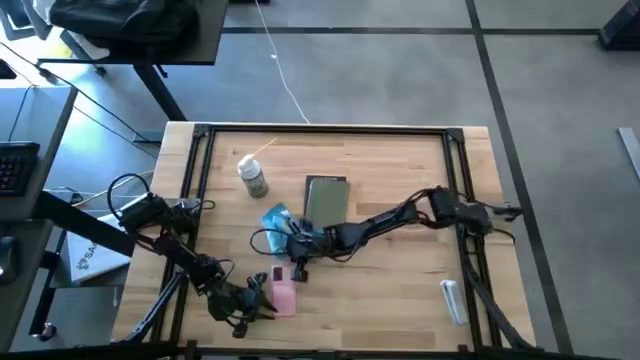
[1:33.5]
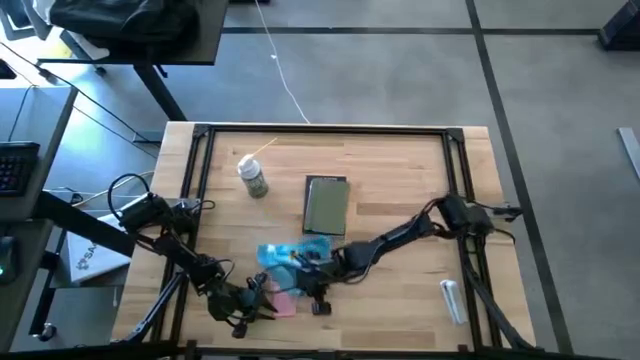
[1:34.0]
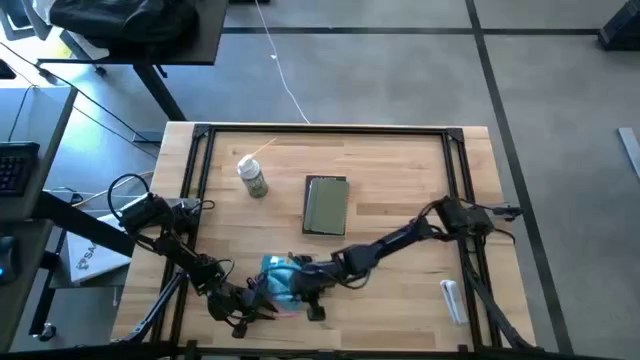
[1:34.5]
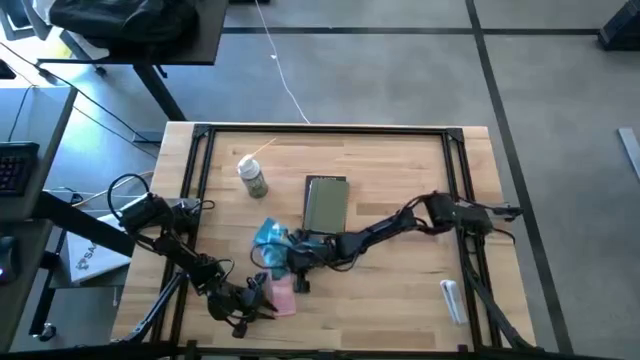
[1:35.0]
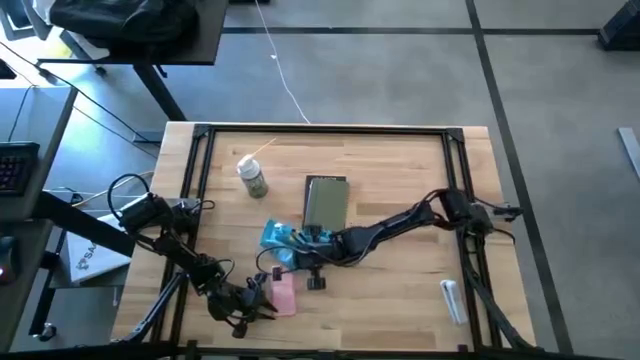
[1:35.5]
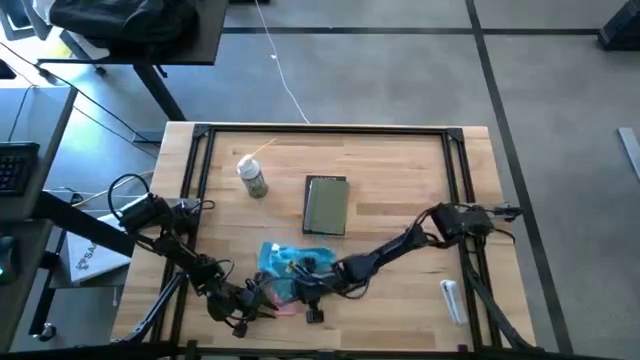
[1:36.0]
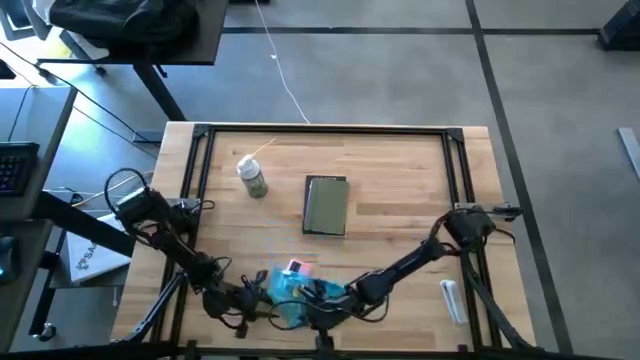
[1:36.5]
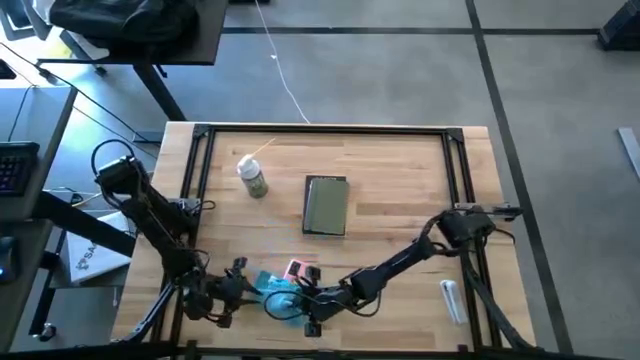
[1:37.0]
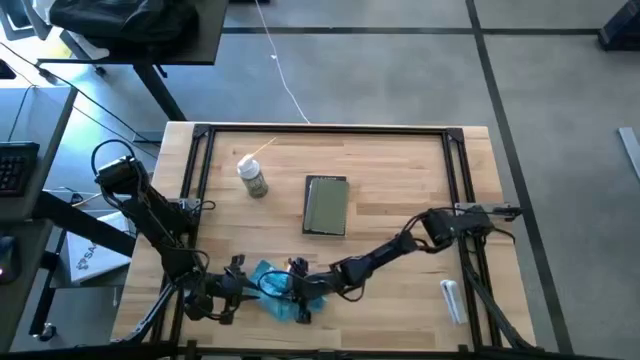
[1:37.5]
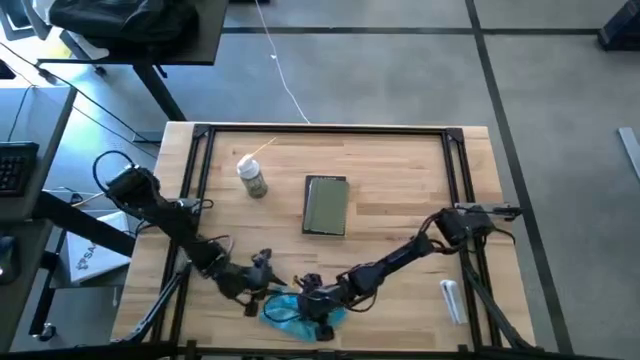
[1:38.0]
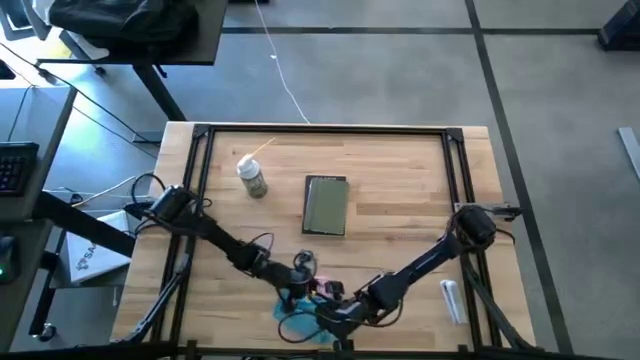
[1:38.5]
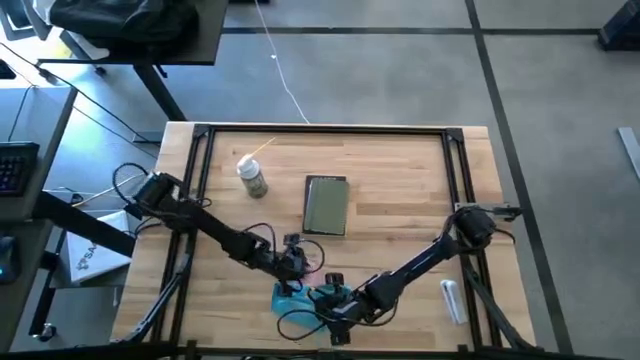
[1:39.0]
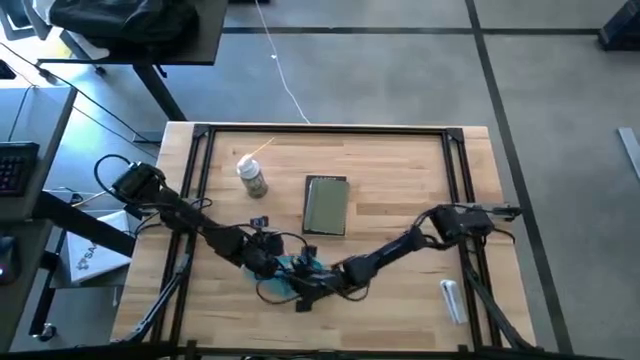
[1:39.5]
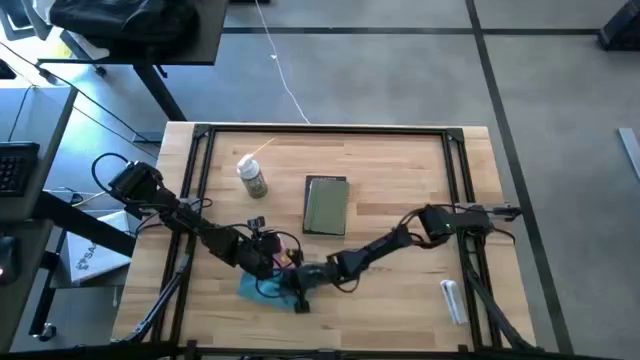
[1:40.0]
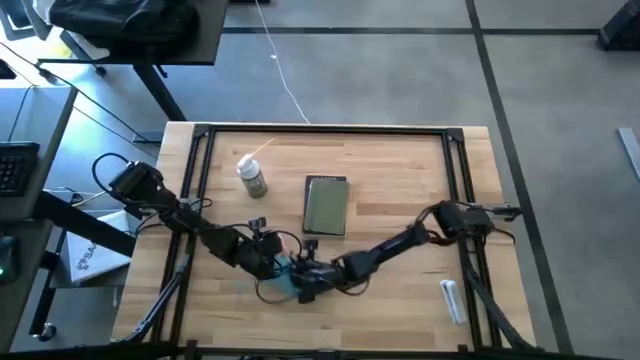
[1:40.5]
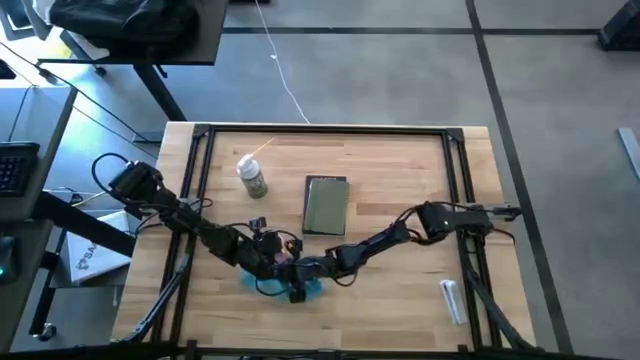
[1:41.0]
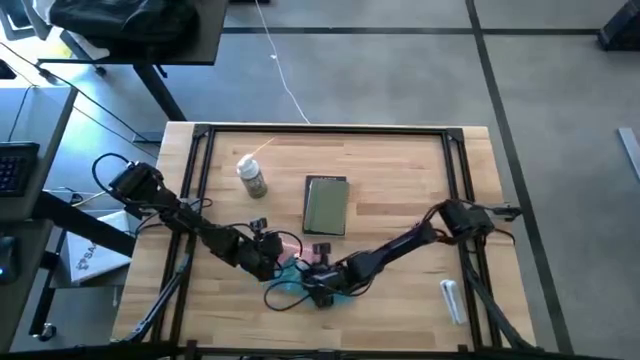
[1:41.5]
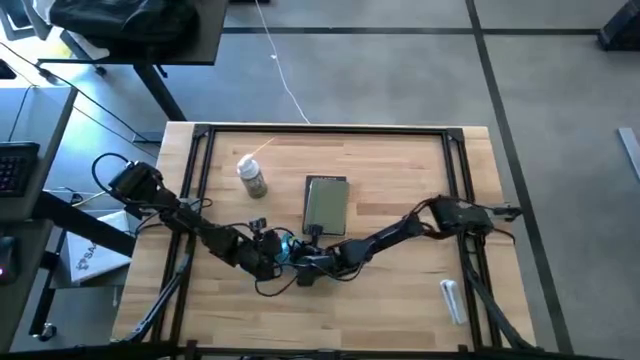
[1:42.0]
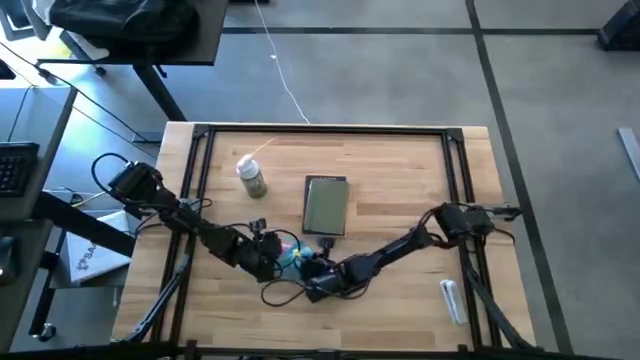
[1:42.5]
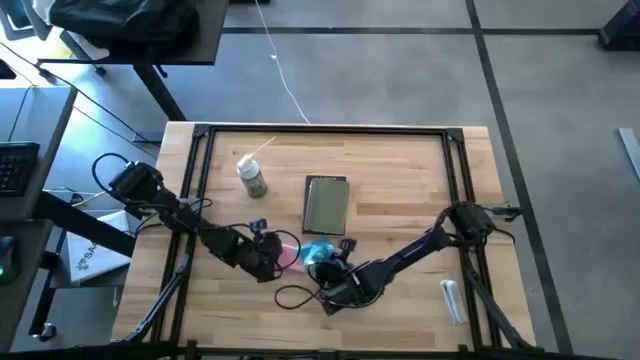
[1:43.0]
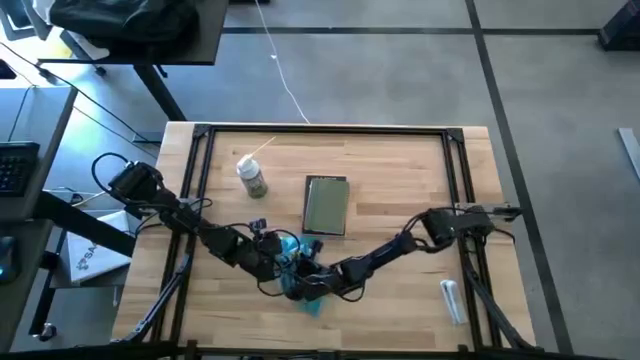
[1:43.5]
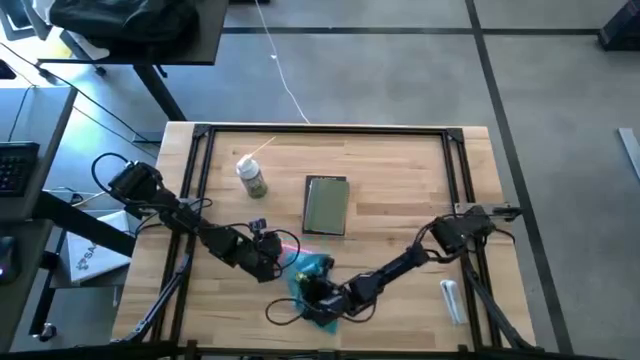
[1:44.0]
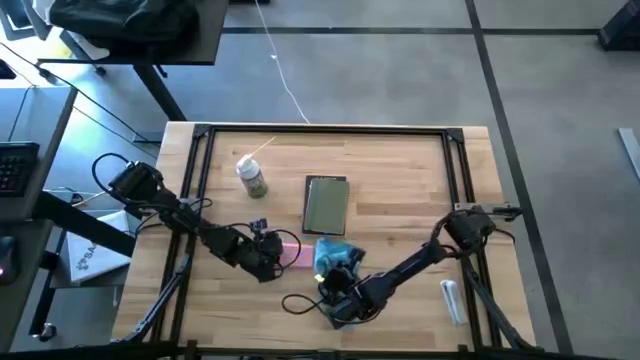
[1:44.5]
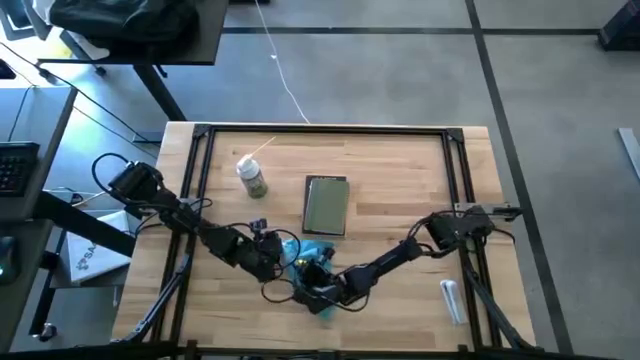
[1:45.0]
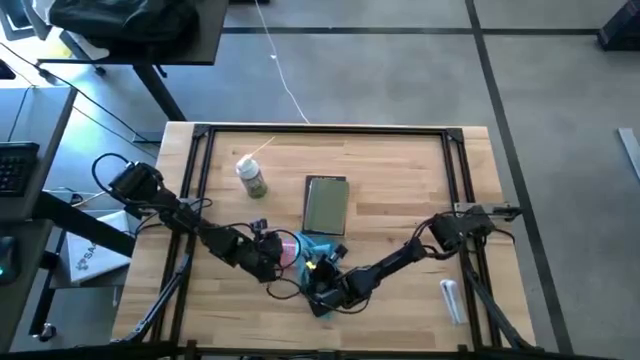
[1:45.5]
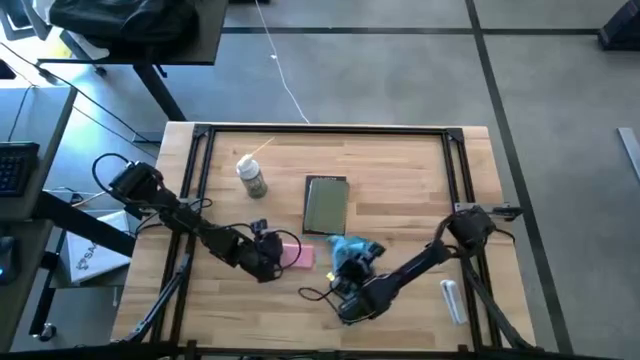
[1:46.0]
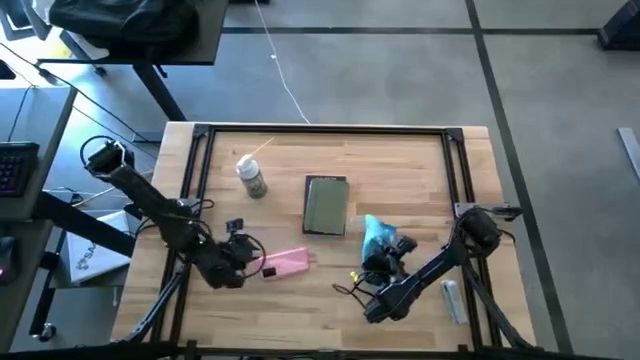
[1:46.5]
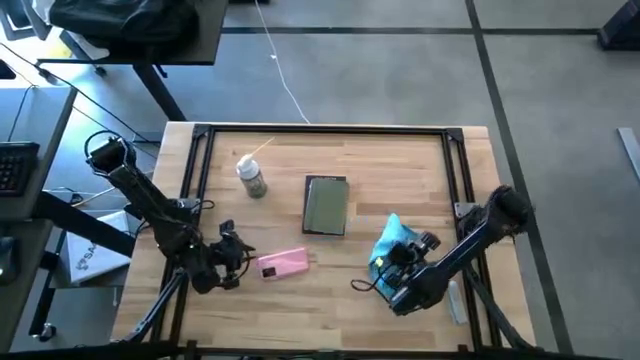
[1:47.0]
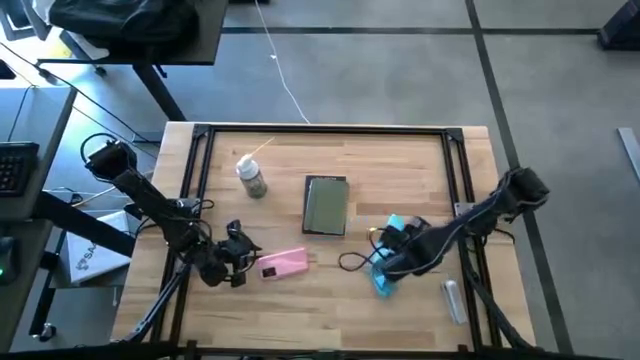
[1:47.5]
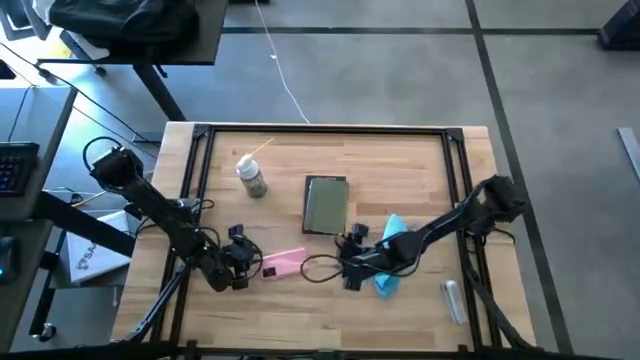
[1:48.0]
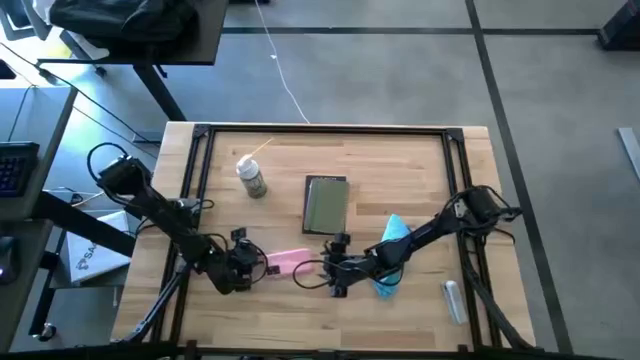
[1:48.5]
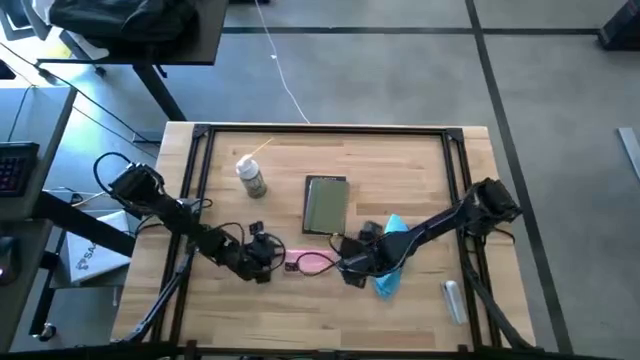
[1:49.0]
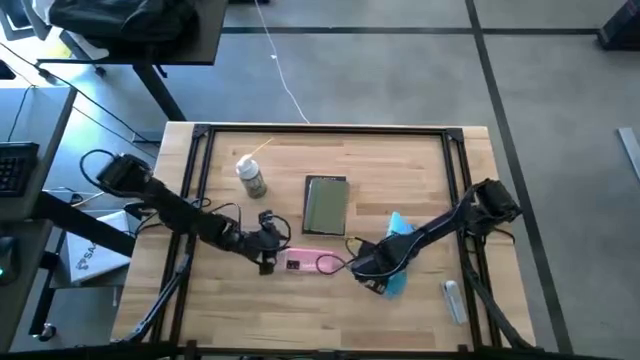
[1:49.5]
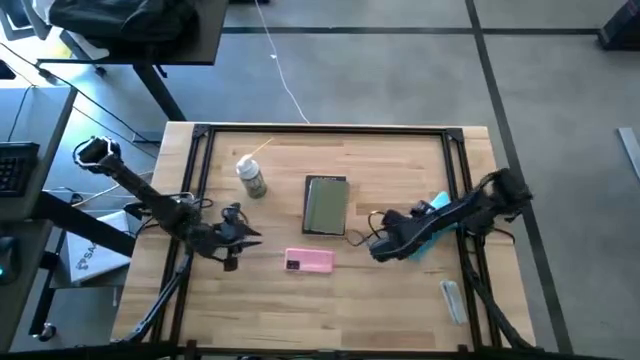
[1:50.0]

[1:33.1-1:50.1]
Task: Apply microfiber cloth
Wipe the cellphone with a microfiber cloth

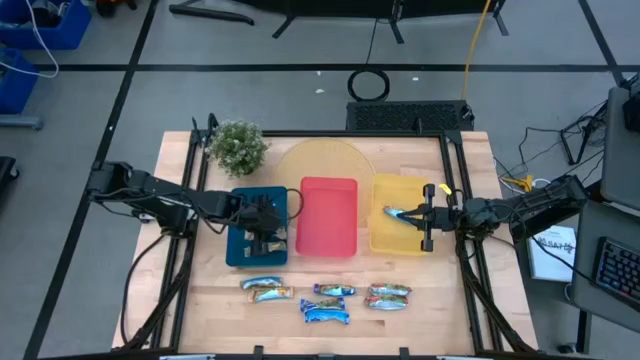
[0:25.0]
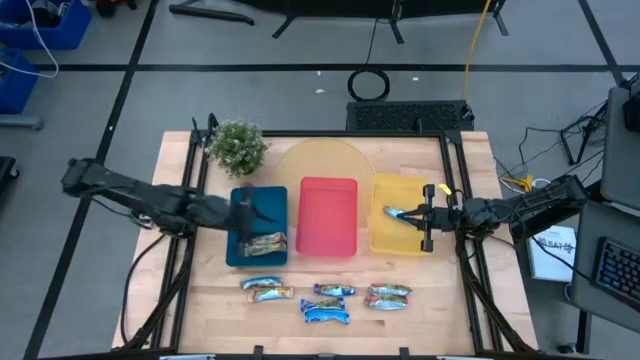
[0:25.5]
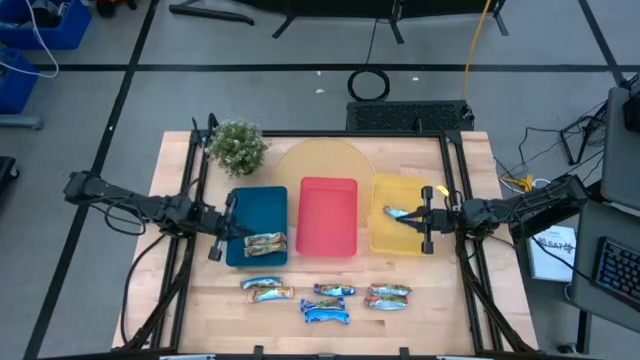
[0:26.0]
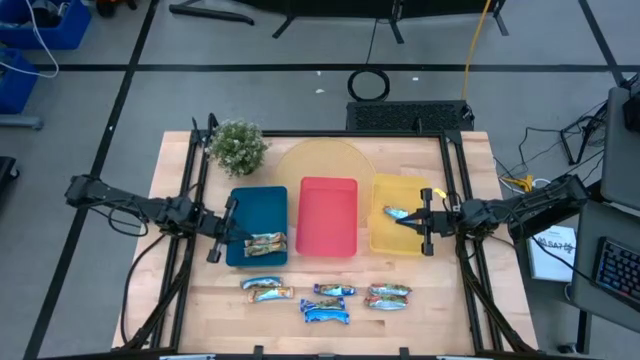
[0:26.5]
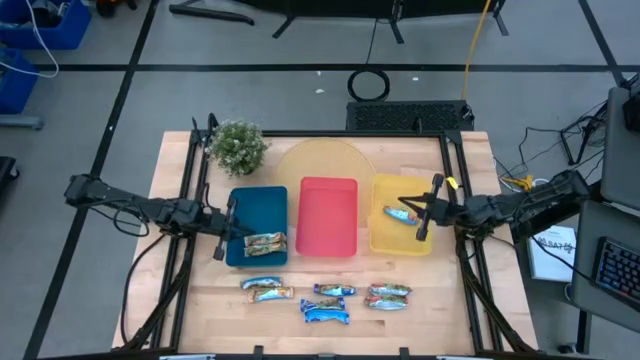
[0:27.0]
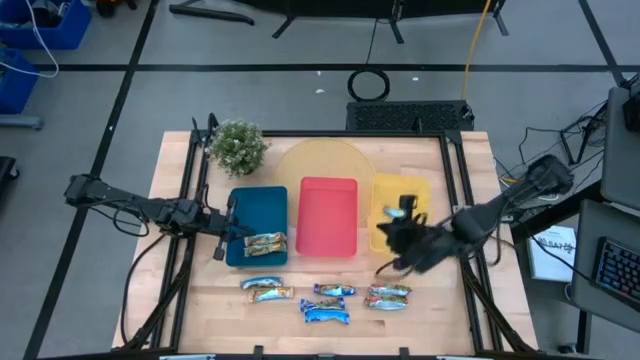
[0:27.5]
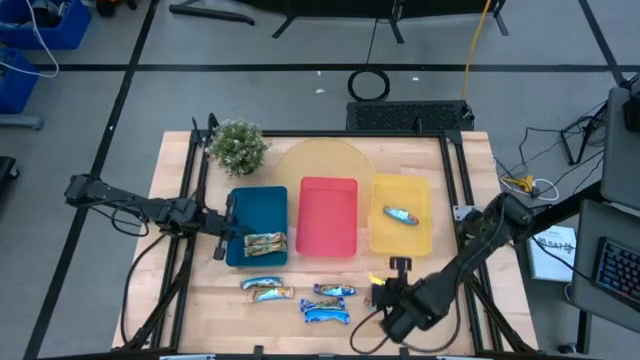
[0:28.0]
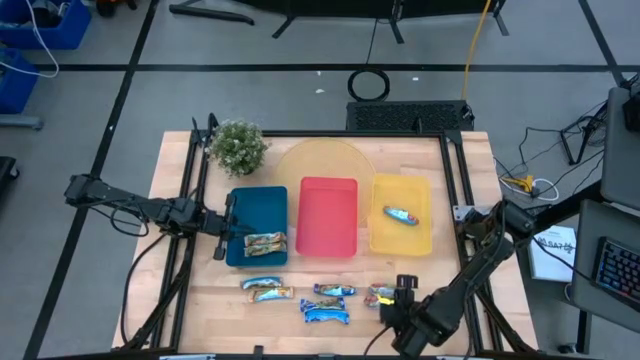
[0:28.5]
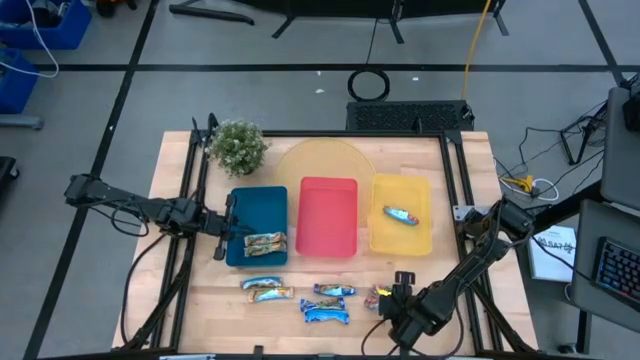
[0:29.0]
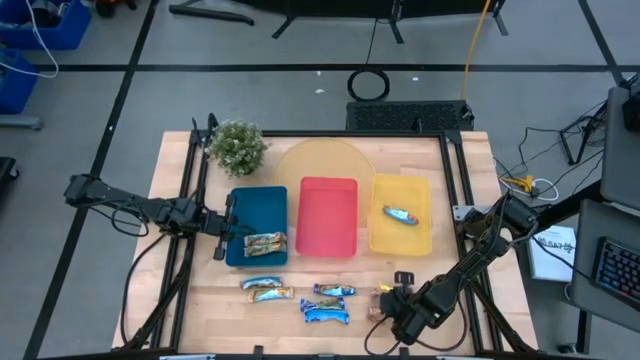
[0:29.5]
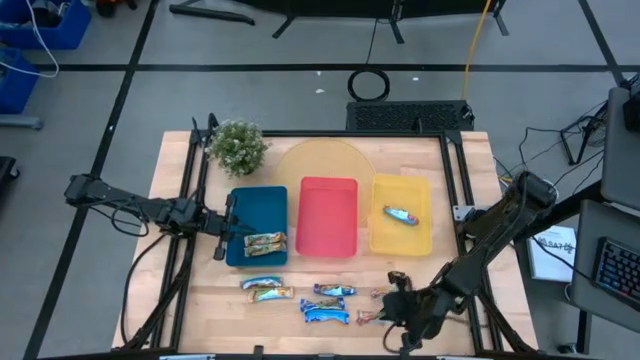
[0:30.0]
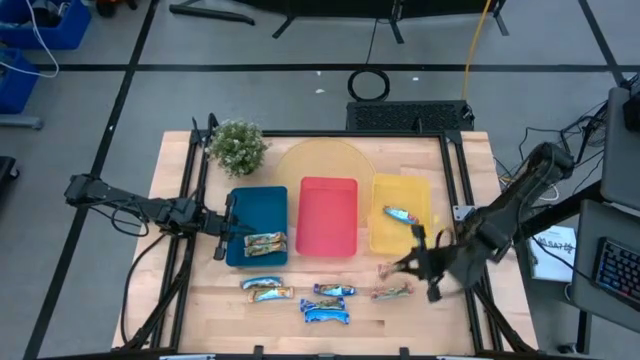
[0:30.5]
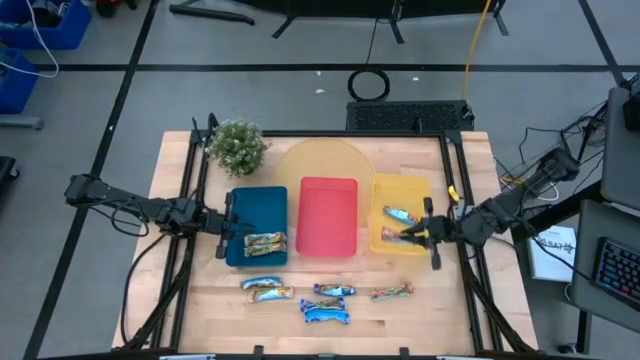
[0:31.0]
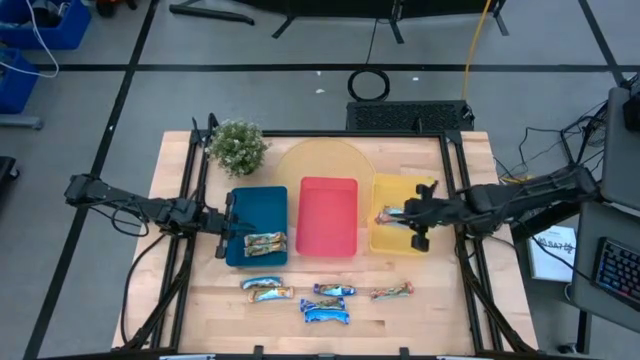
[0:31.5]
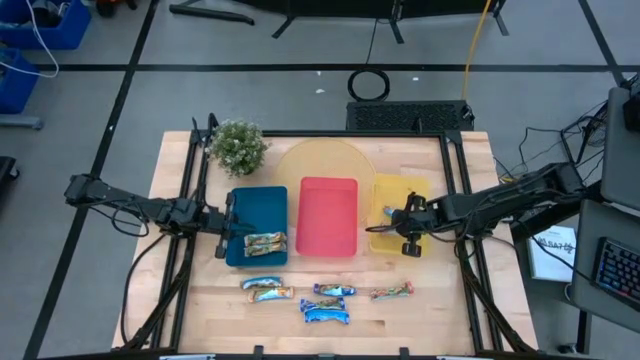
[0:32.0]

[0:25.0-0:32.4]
Task: Pick and place Granola Bars by type
Put the red granola bar into the yellow bin
